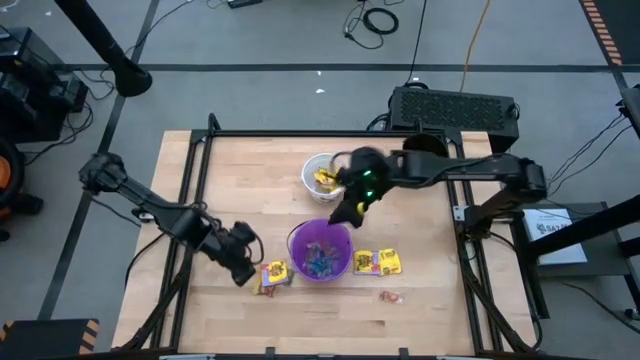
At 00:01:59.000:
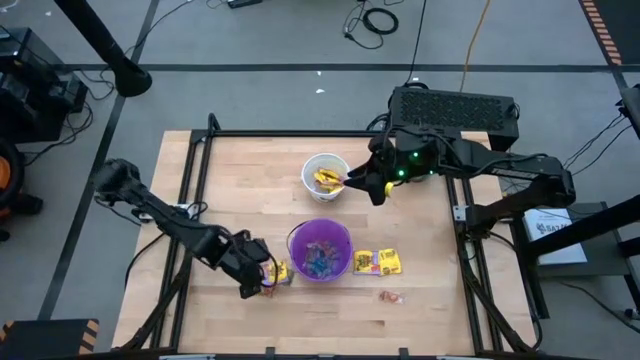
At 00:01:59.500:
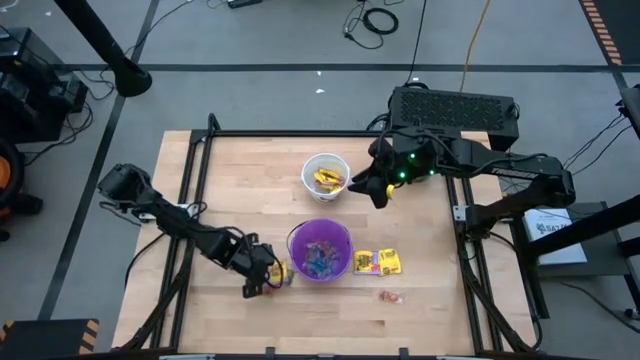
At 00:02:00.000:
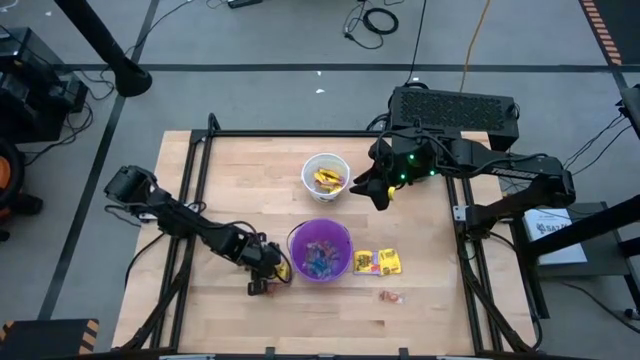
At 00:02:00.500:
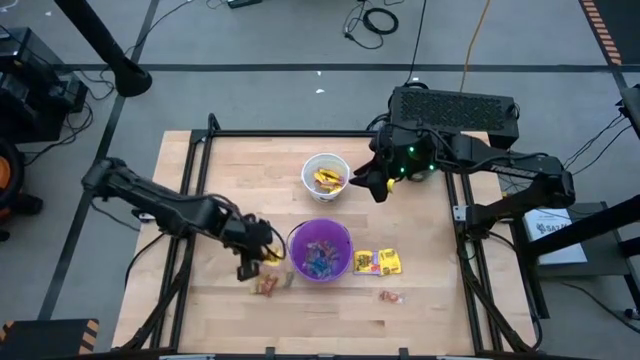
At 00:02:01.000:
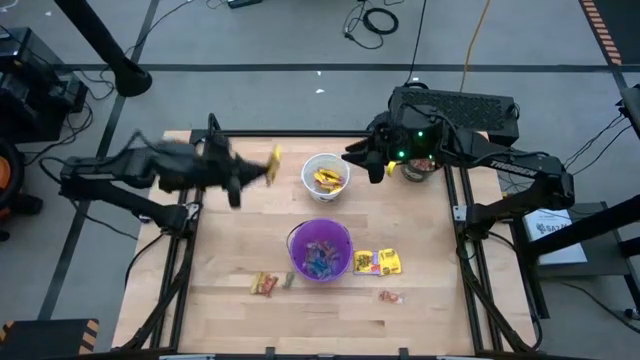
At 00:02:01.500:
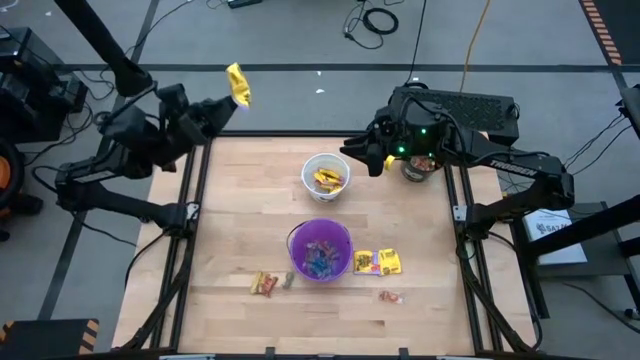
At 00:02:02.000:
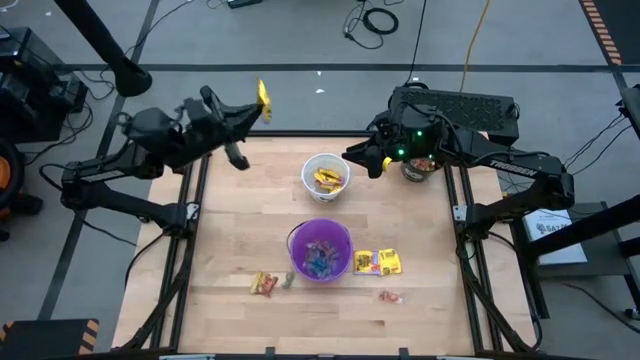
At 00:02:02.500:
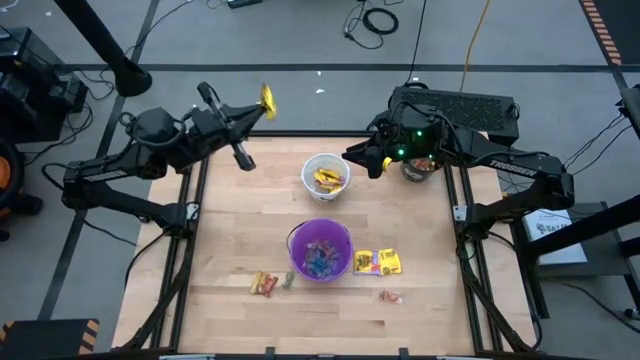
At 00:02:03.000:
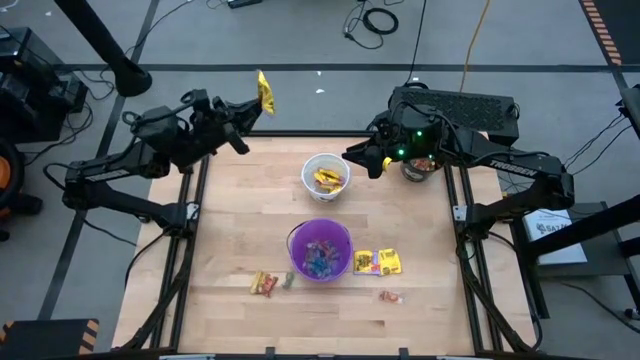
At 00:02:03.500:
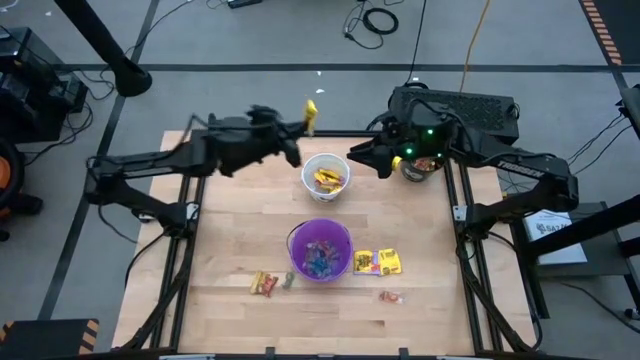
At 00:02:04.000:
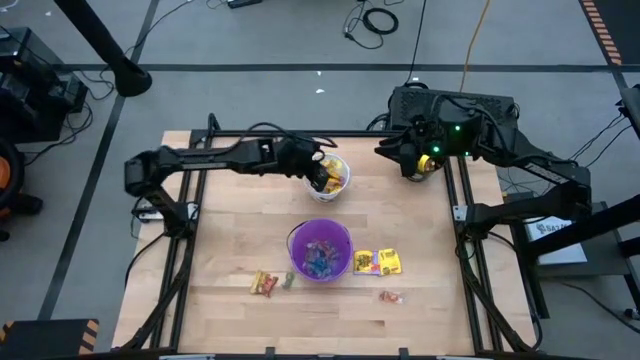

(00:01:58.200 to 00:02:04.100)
Task: Sort candy by brand, put in halloween buckets
Put the yellow candy into the white bucket

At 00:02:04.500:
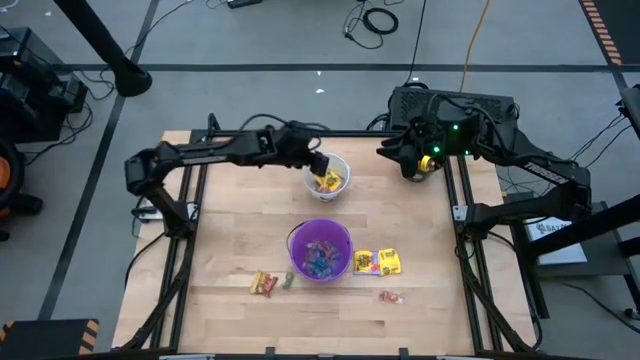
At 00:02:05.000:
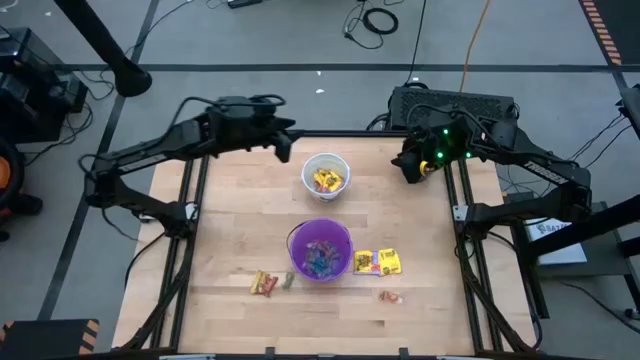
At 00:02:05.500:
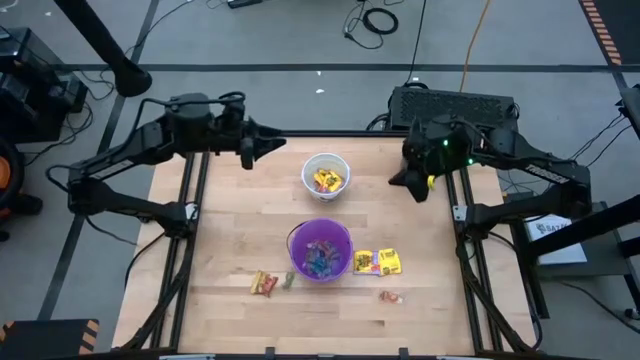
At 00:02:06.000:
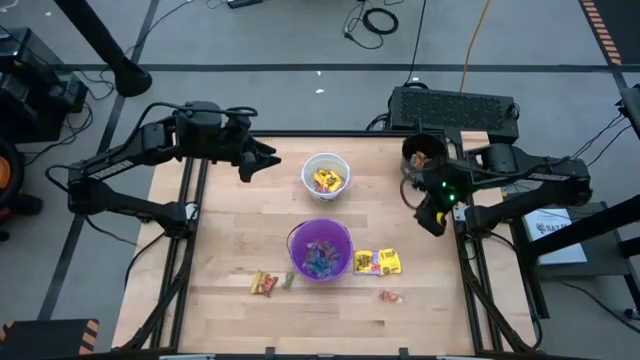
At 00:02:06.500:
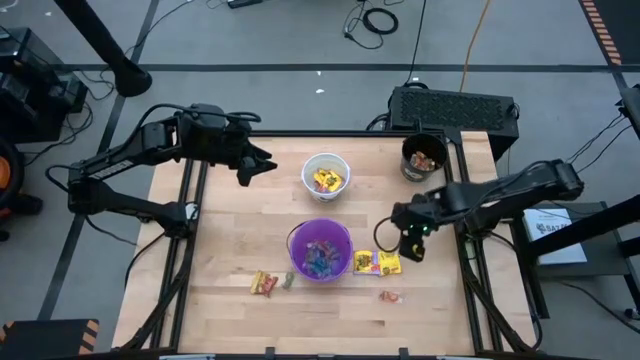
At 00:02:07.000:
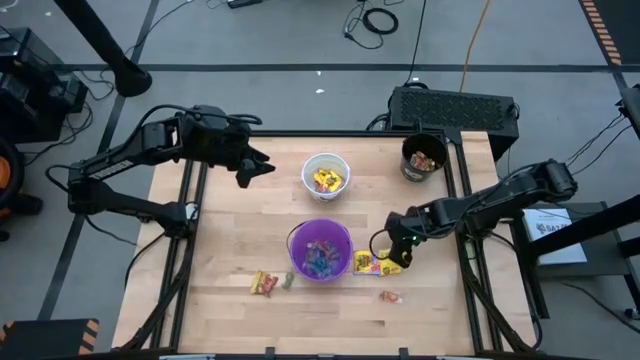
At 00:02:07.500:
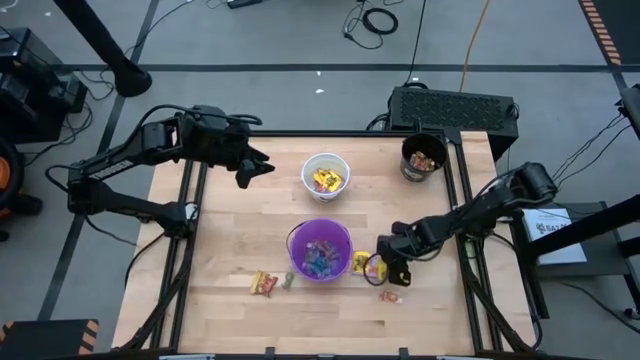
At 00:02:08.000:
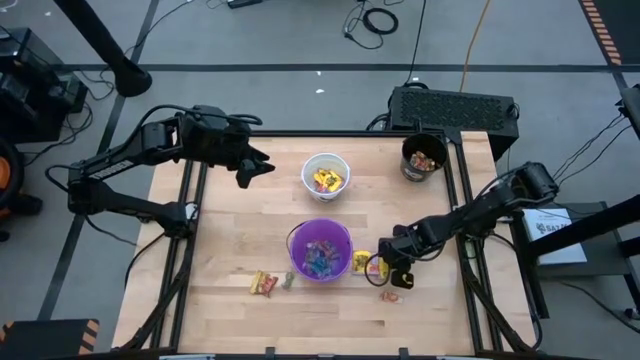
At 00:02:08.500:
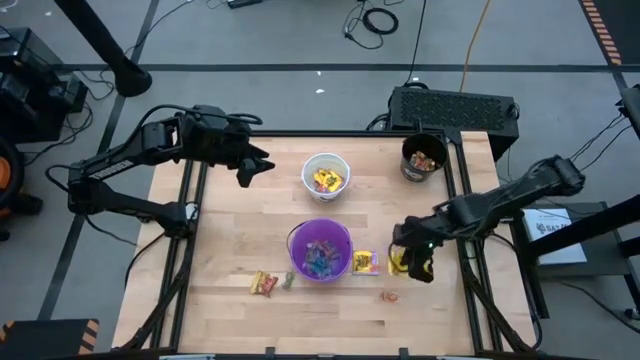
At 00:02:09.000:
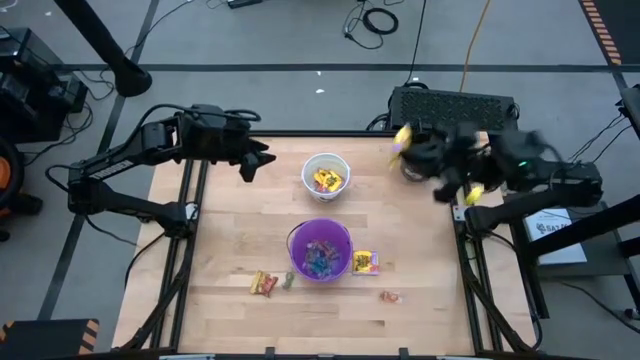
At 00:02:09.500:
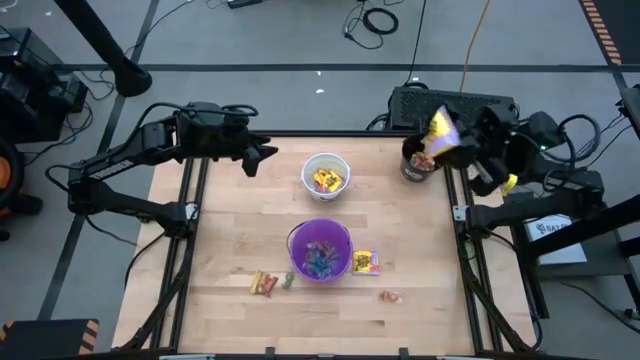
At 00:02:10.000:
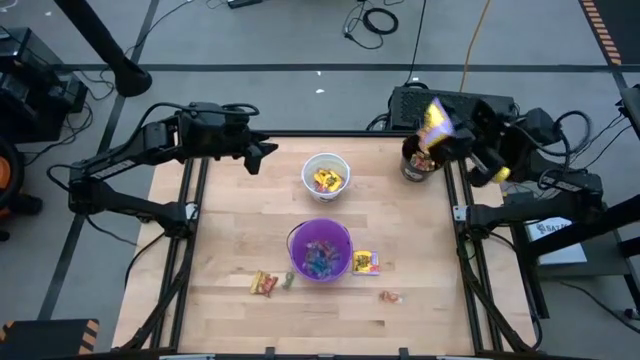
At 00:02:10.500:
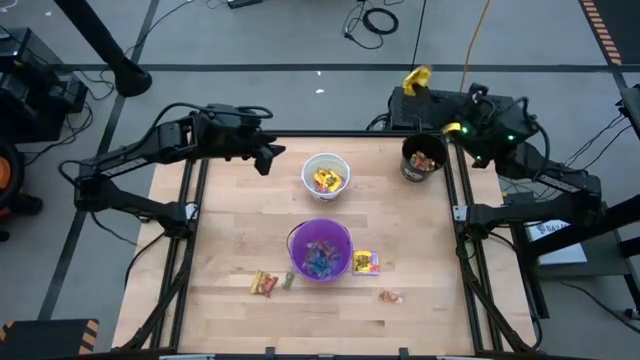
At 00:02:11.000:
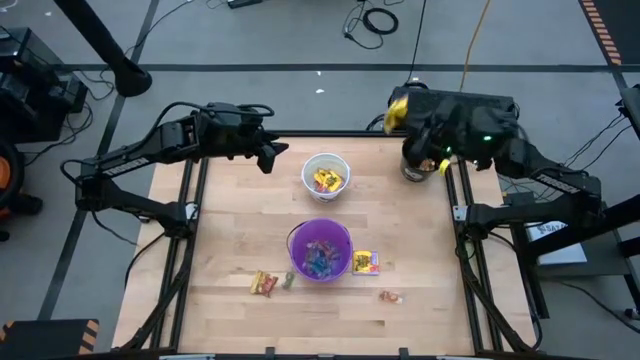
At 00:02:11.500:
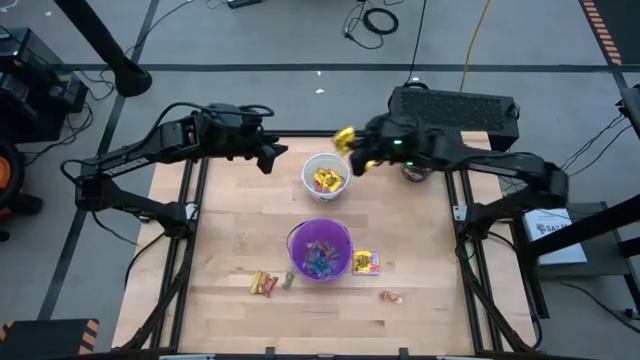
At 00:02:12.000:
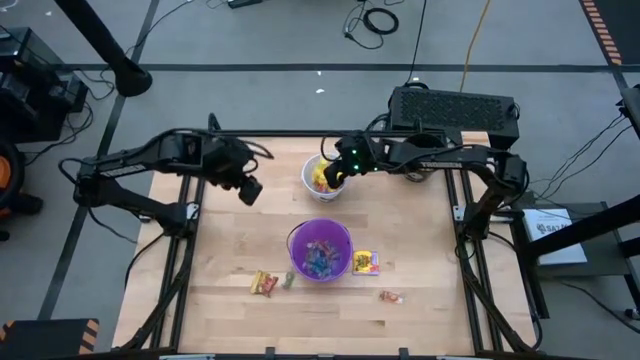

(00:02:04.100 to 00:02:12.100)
Put the yellow candy into the white bucket

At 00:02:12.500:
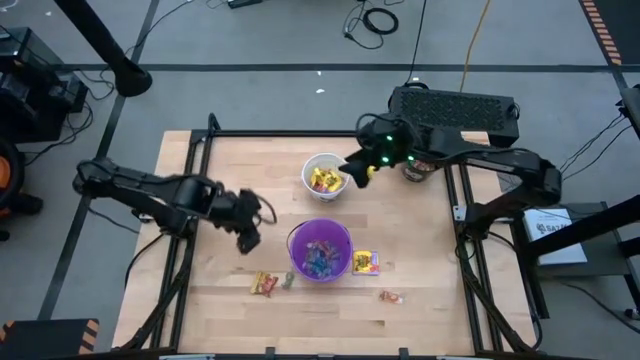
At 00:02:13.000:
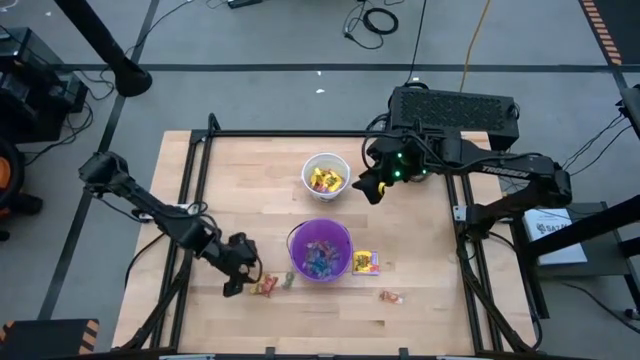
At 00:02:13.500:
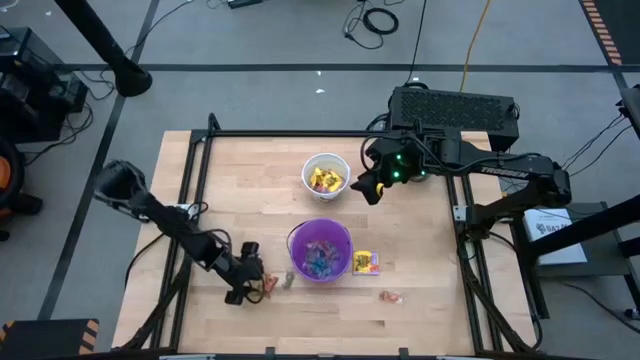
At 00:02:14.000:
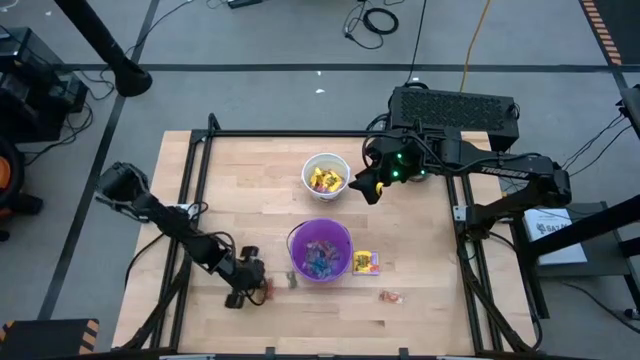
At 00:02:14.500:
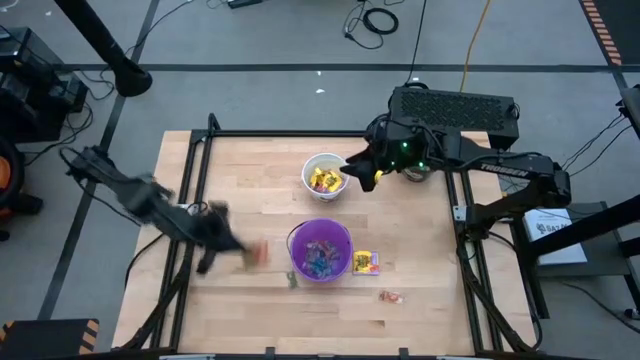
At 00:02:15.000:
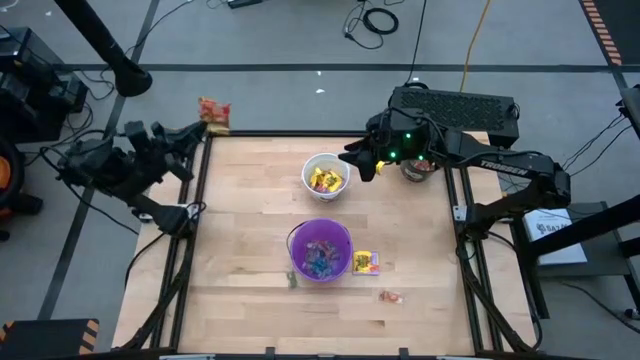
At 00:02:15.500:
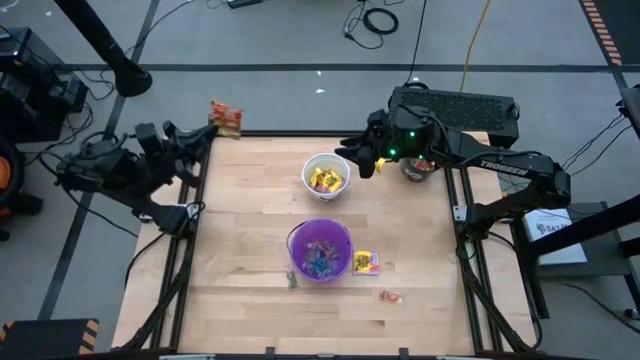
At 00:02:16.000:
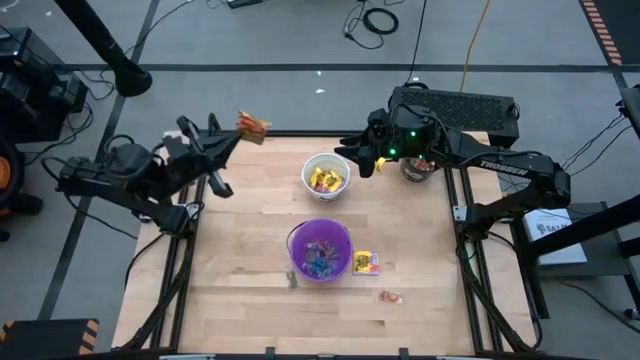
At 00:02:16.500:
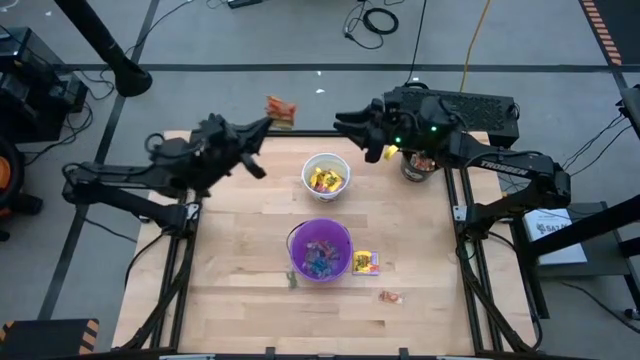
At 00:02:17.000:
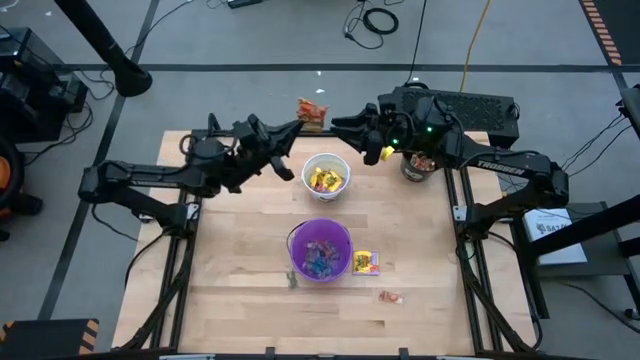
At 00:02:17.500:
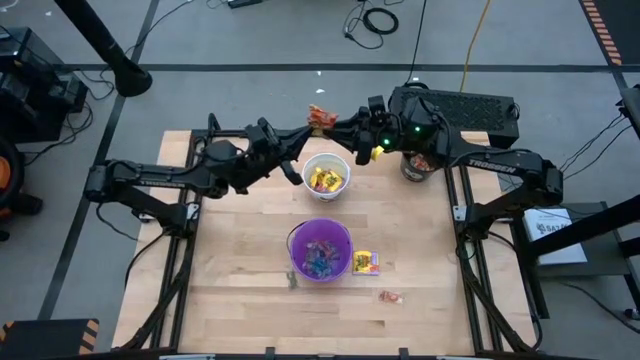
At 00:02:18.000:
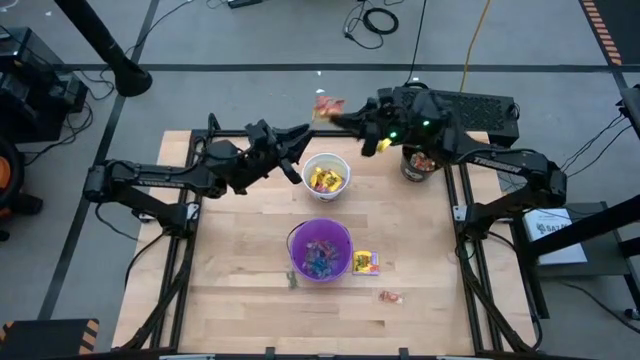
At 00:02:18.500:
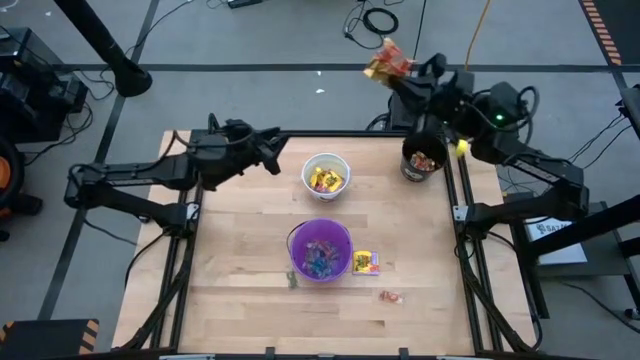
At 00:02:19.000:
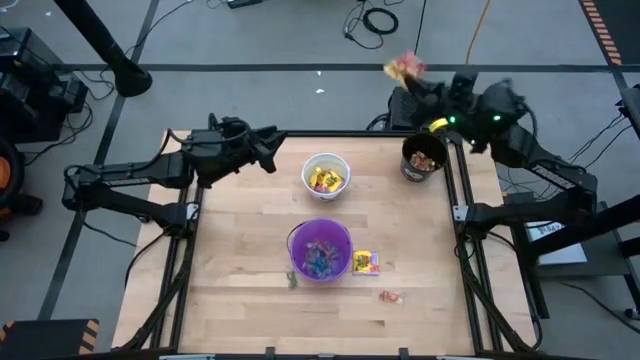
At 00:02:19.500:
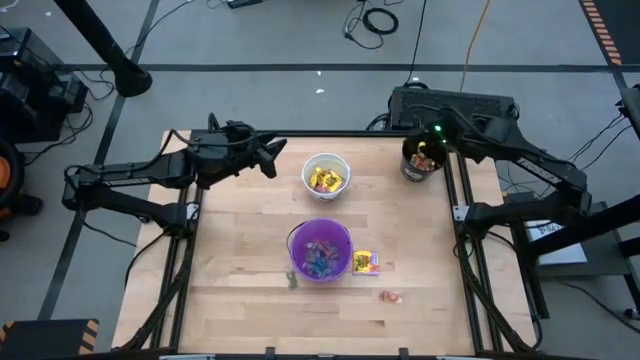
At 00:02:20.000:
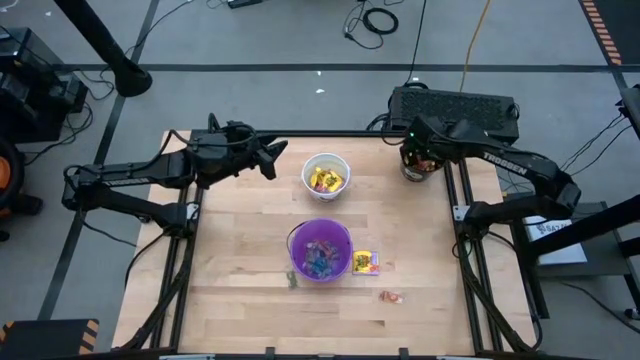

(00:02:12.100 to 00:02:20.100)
Put the gold candy into the black bucket
